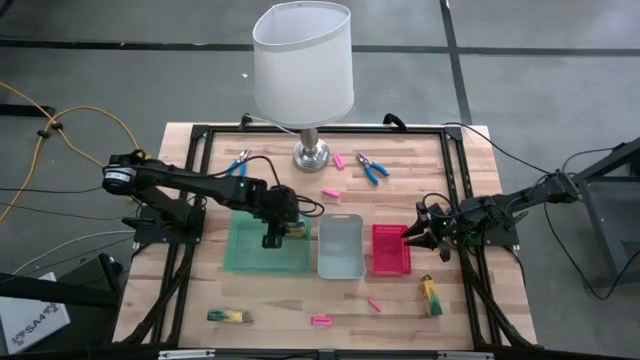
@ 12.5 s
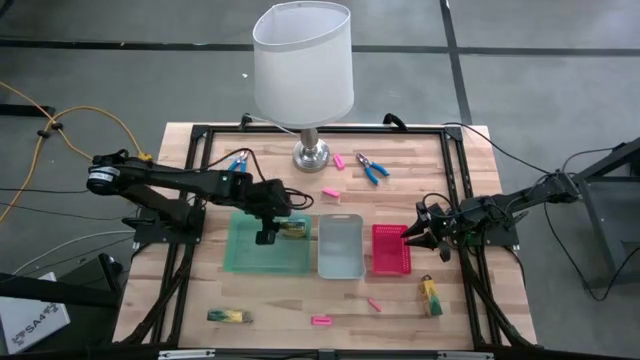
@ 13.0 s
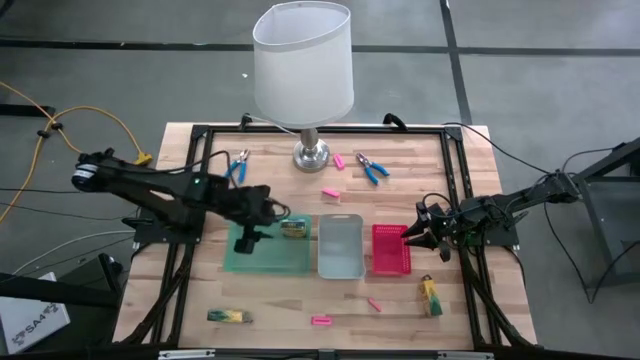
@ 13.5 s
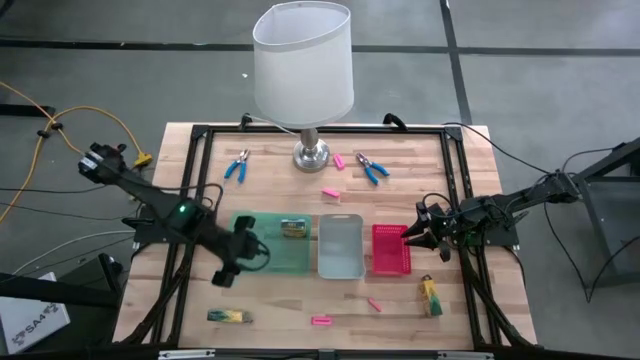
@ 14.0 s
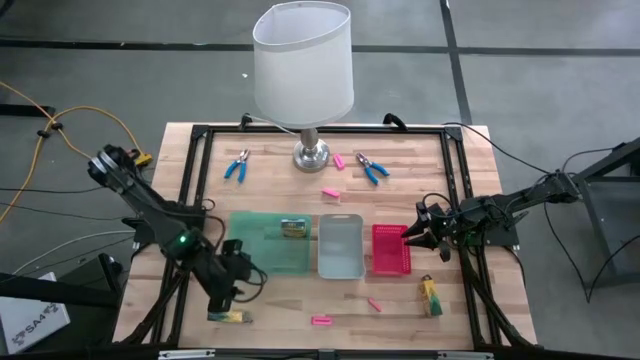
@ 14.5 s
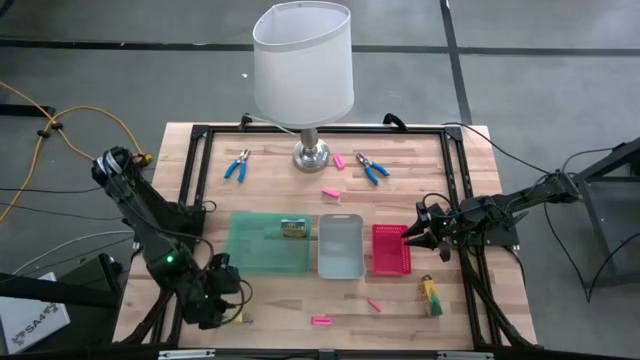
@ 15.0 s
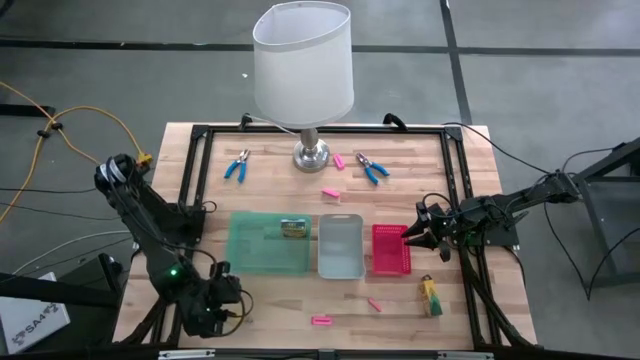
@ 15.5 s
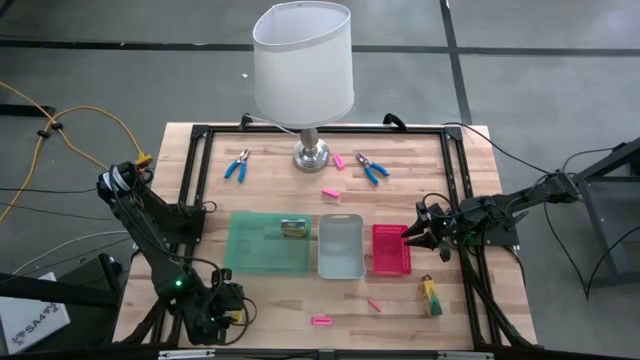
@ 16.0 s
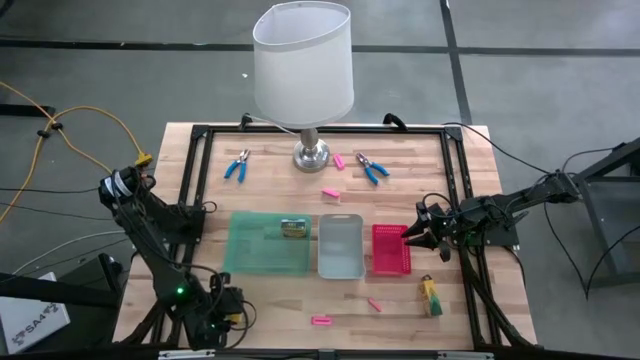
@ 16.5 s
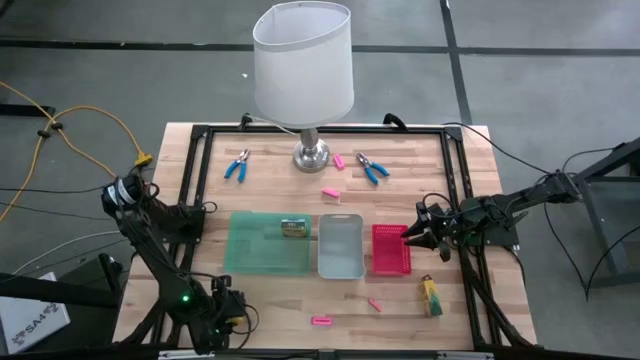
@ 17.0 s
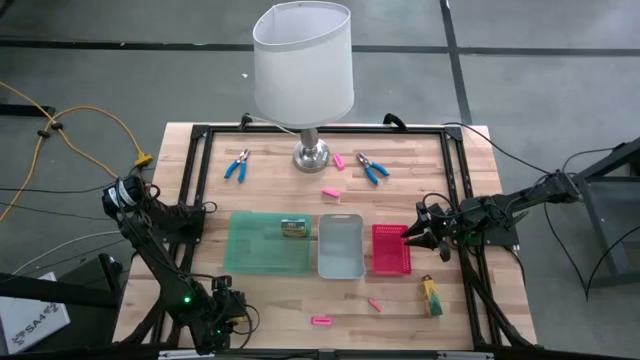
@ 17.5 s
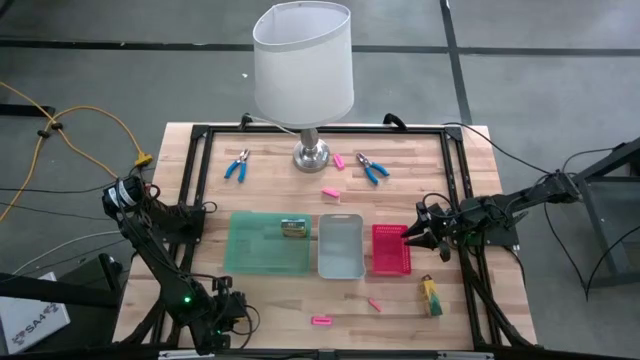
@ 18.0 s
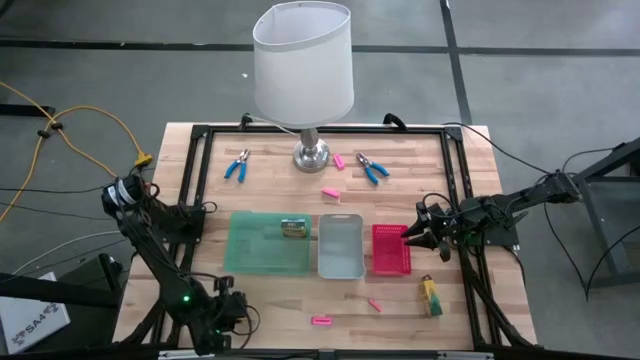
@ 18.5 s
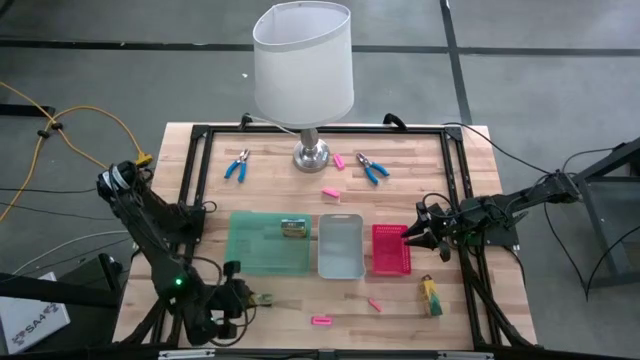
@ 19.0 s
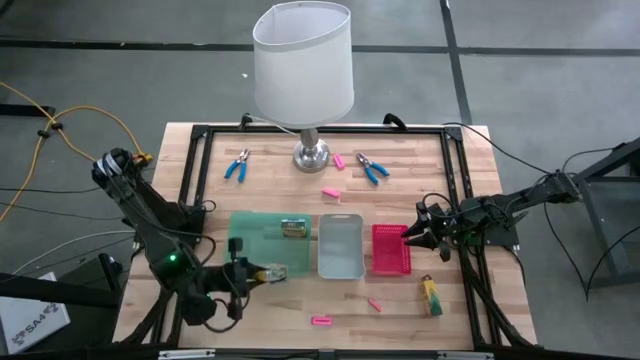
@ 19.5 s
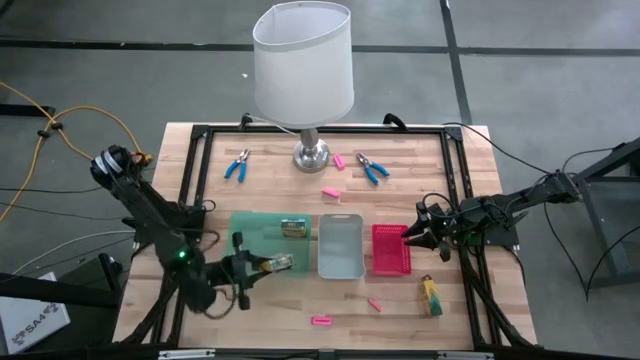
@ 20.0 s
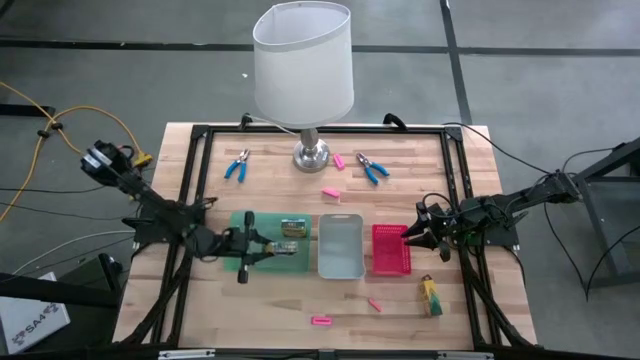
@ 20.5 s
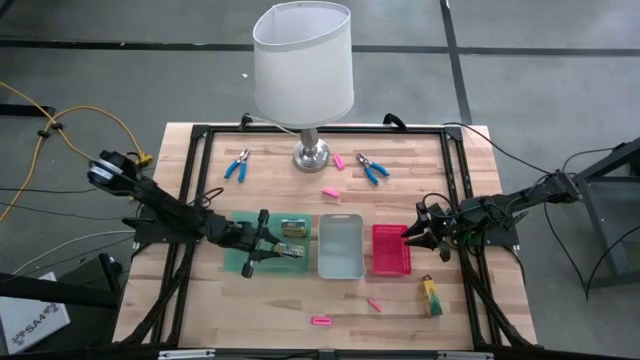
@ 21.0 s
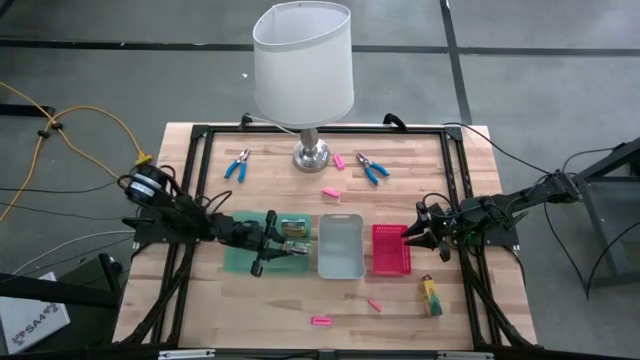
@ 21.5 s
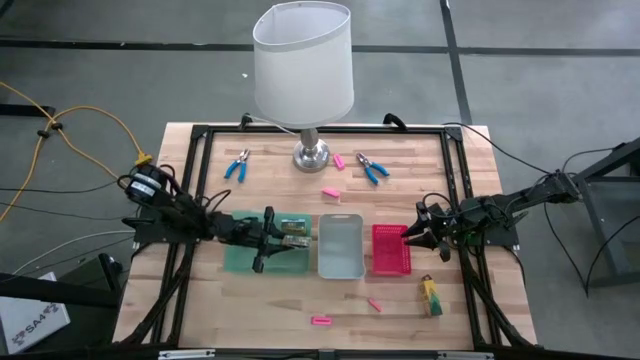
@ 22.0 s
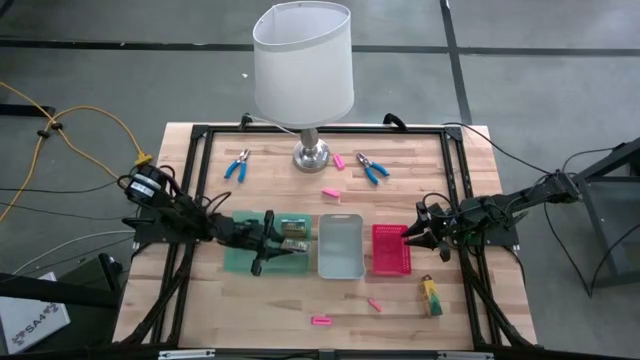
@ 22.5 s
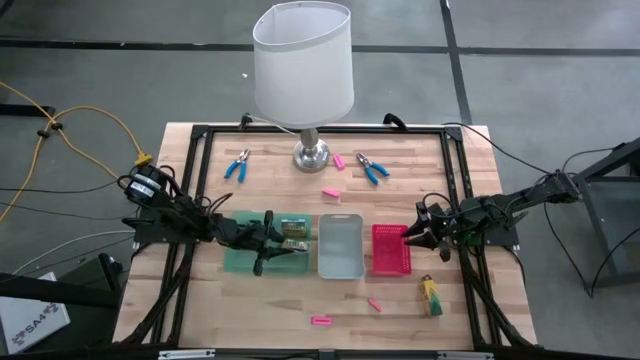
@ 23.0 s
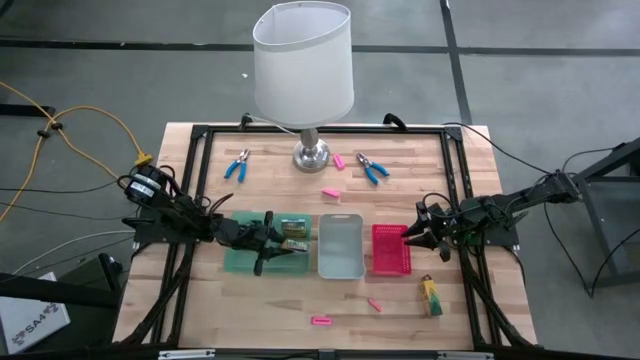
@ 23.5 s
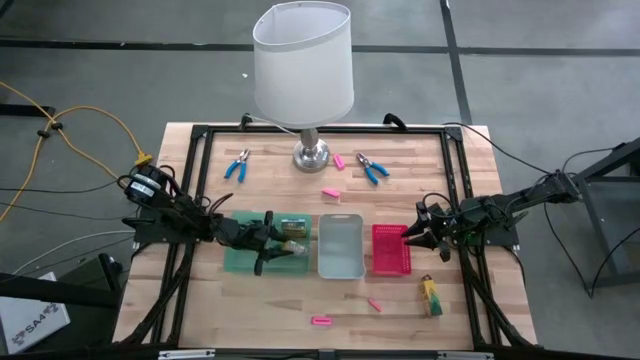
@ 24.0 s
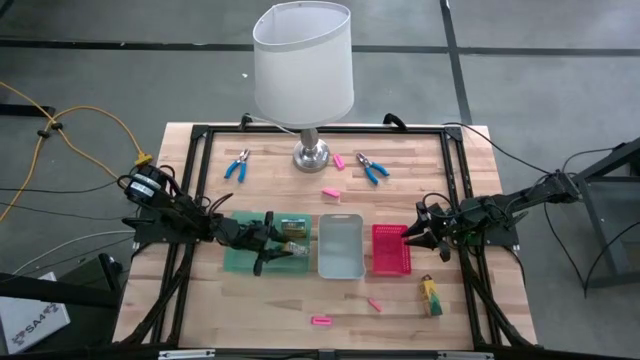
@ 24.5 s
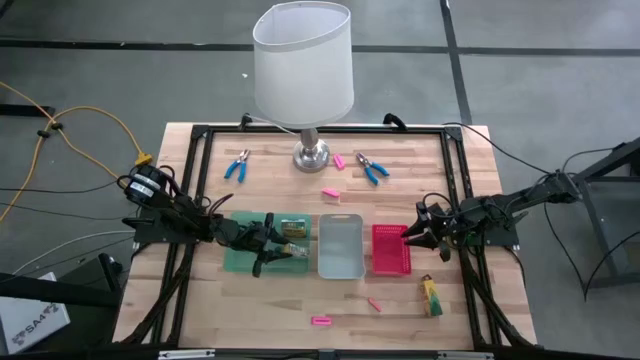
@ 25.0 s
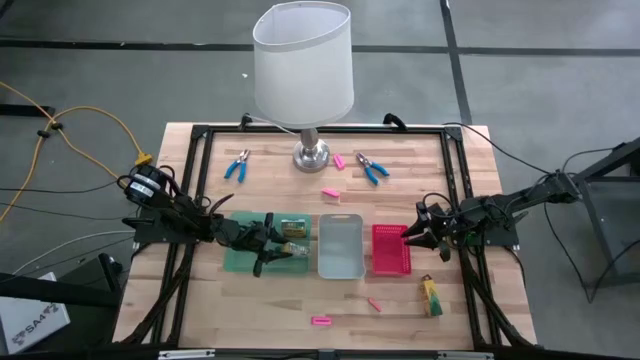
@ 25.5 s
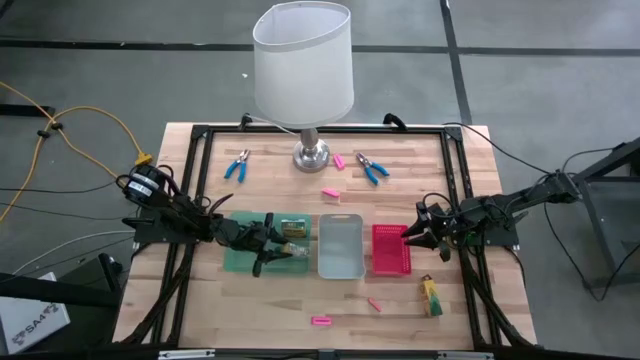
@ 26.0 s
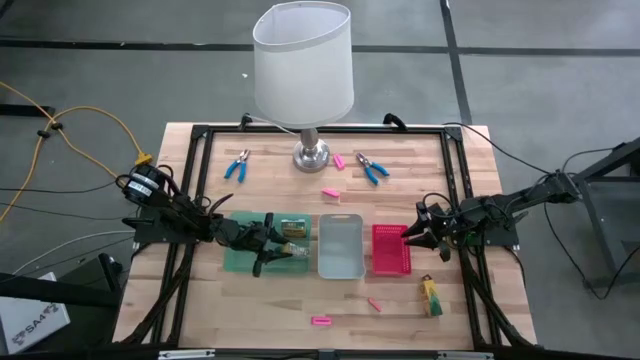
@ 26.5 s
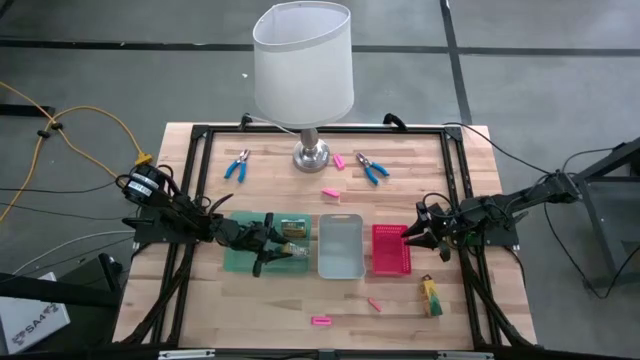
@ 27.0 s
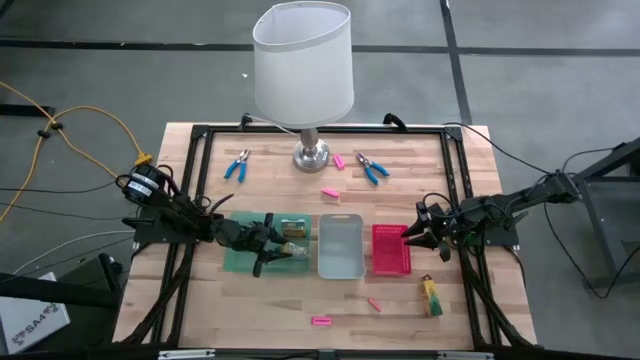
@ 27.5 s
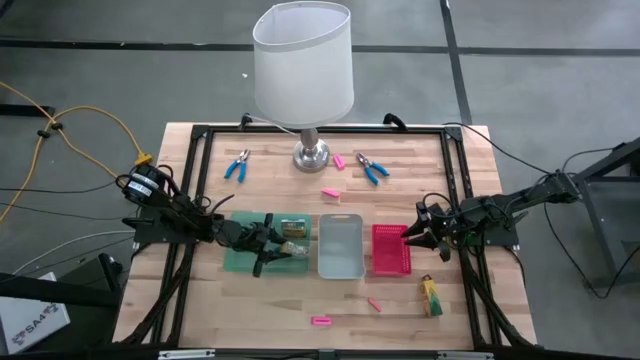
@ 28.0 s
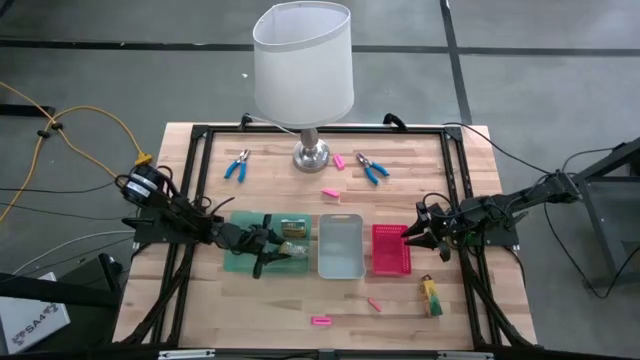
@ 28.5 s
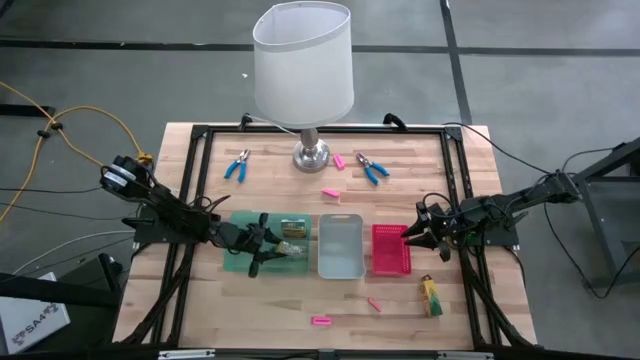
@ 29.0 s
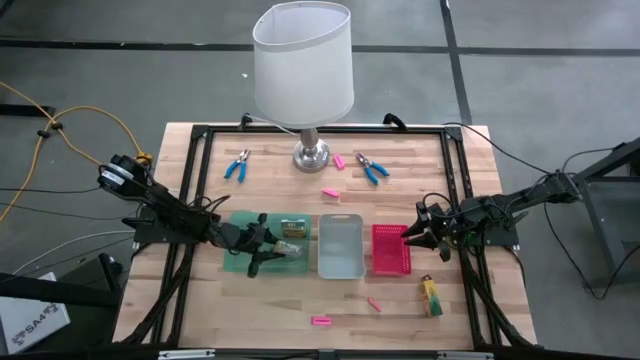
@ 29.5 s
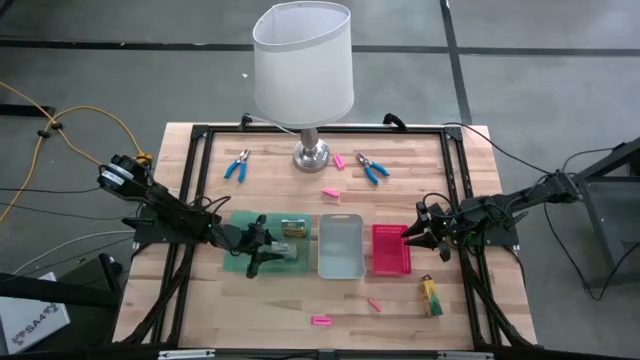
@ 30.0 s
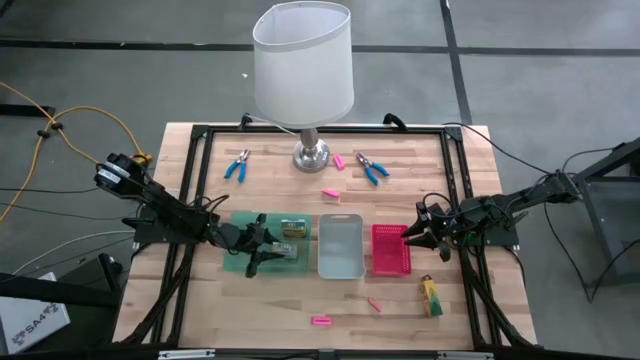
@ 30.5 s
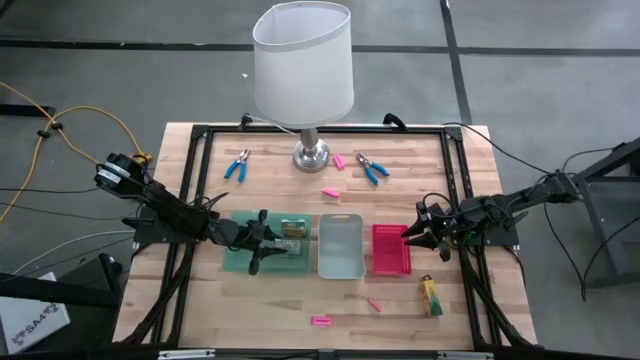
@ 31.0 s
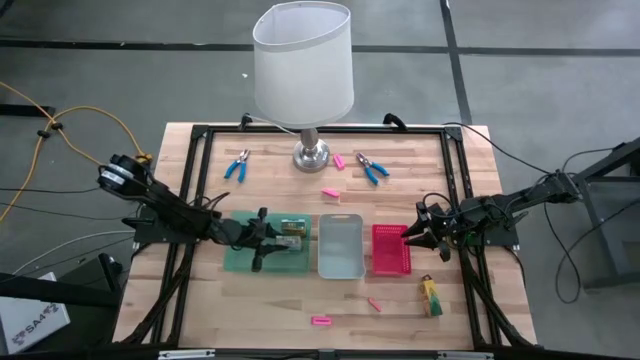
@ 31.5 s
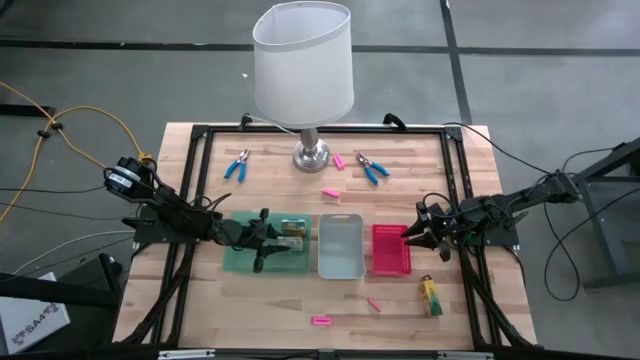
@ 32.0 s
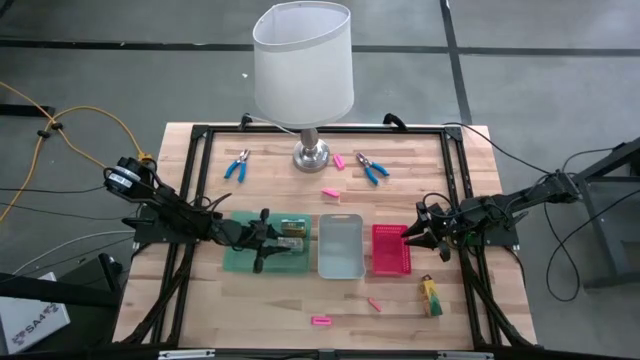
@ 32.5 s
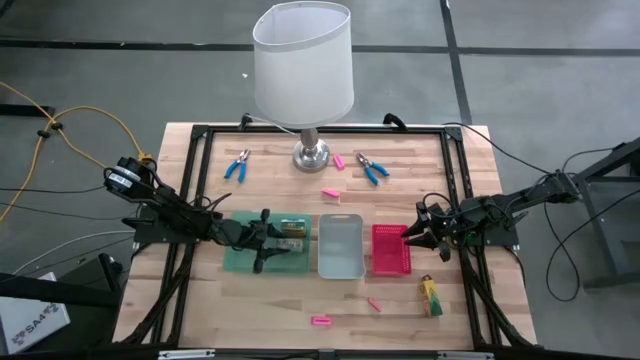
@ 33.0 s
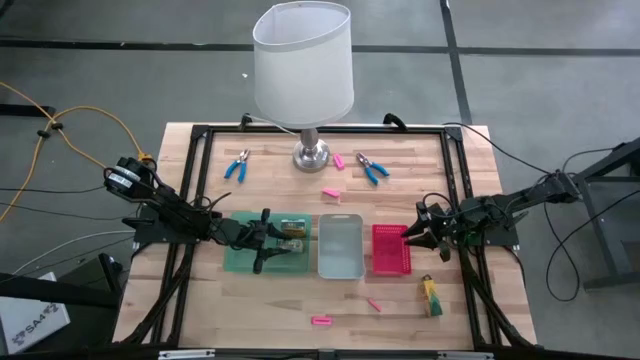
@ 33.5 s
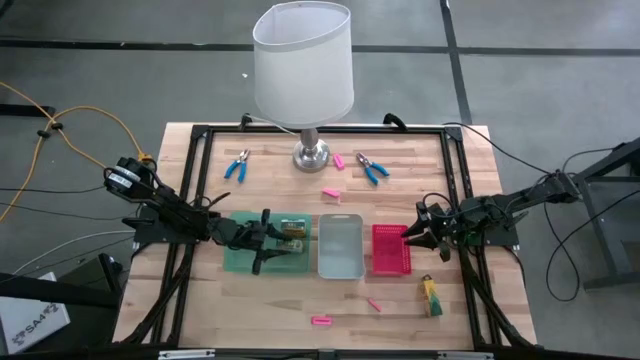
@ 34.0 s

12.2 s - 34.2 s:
Task: Pick & Place School Supplies
Put the yellow box of crayons into the green bin
